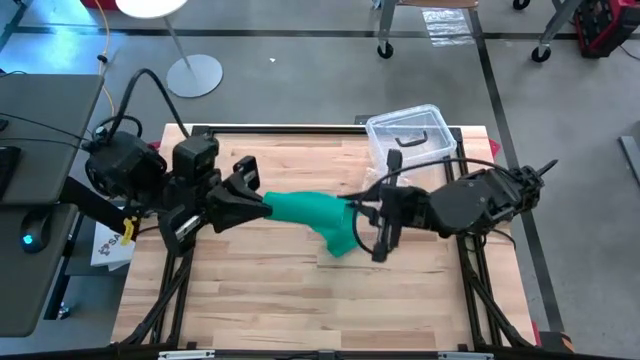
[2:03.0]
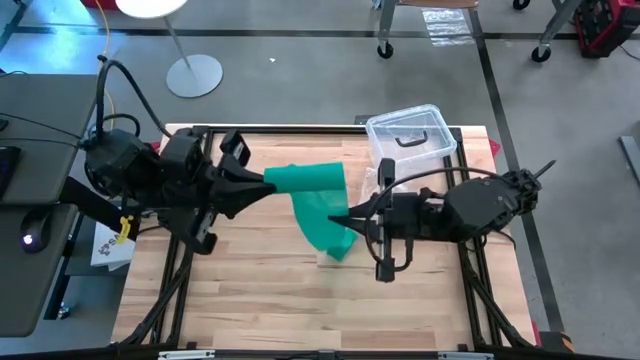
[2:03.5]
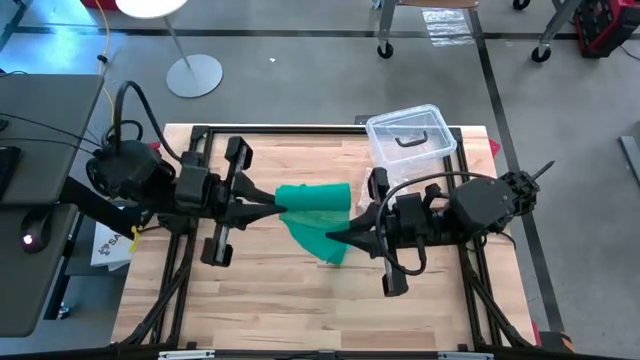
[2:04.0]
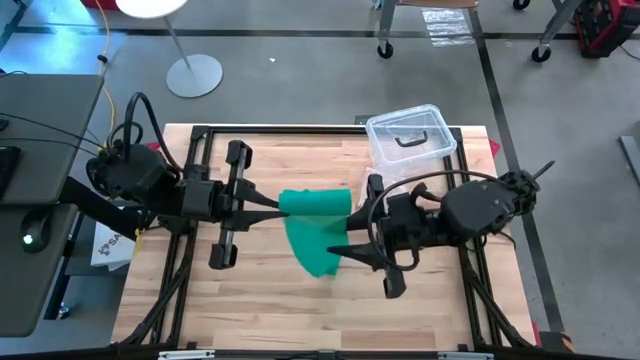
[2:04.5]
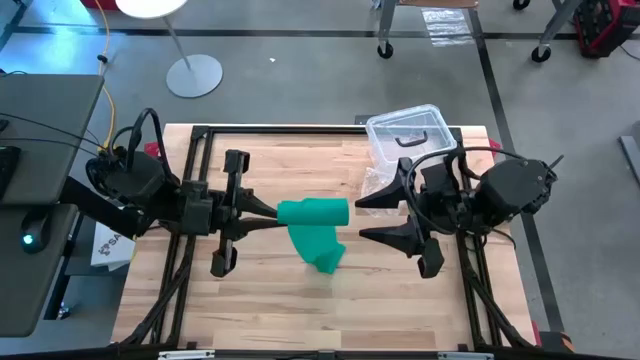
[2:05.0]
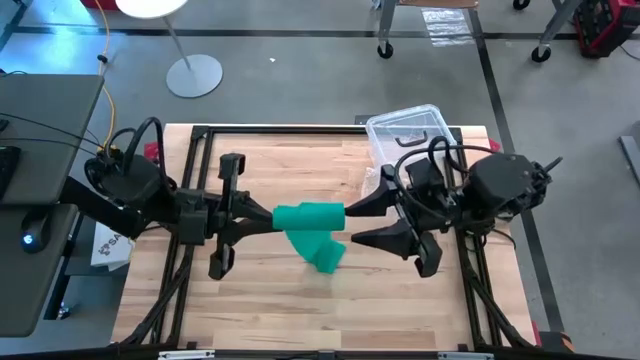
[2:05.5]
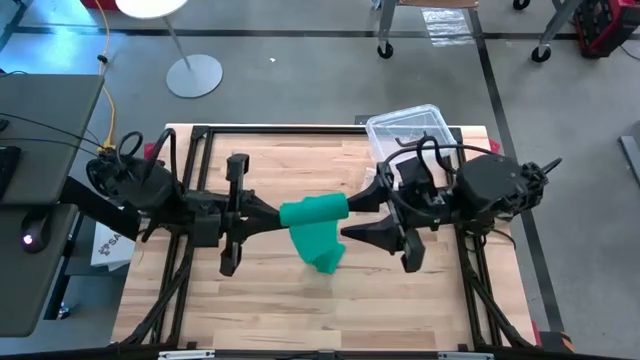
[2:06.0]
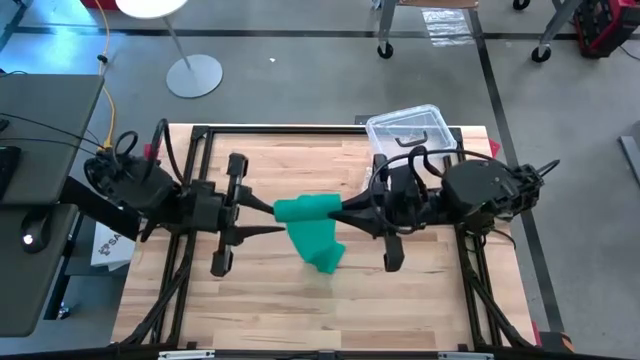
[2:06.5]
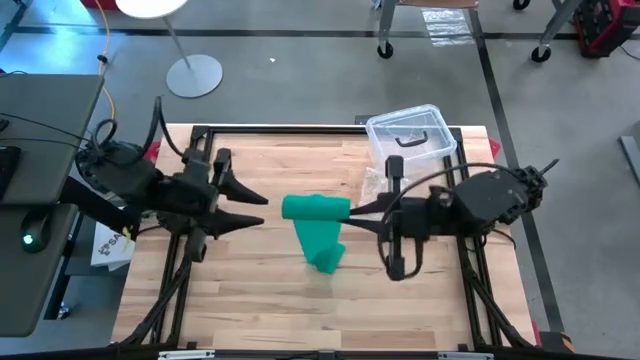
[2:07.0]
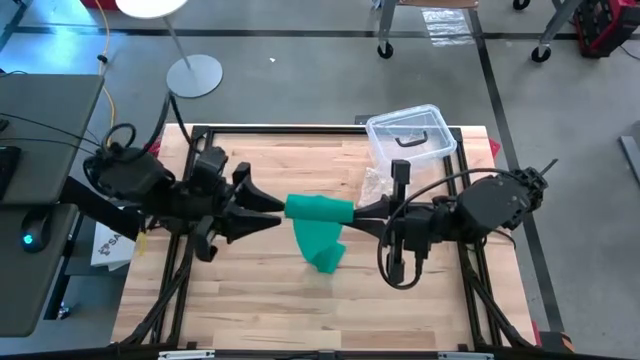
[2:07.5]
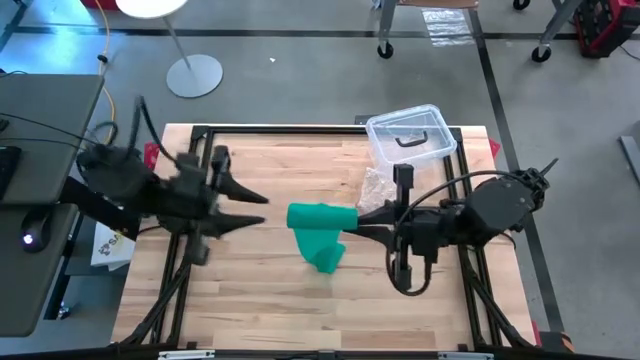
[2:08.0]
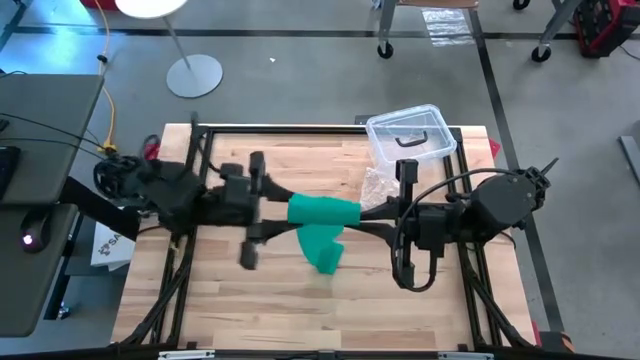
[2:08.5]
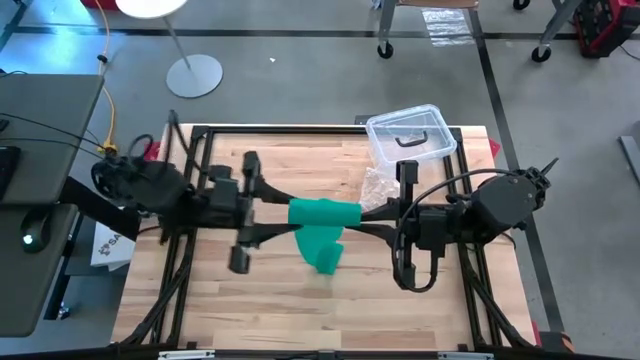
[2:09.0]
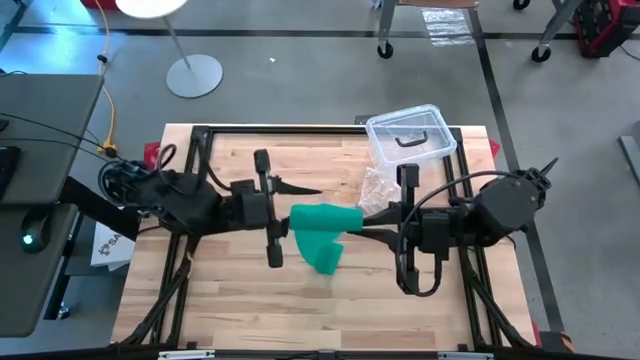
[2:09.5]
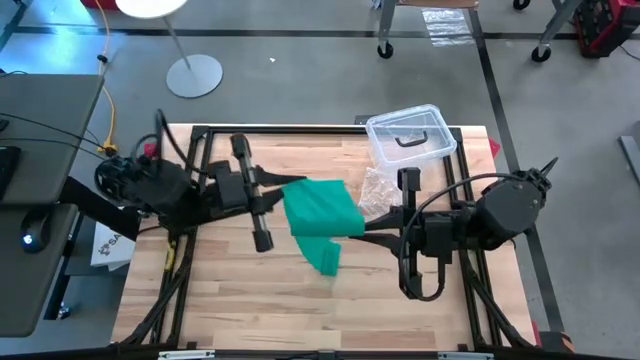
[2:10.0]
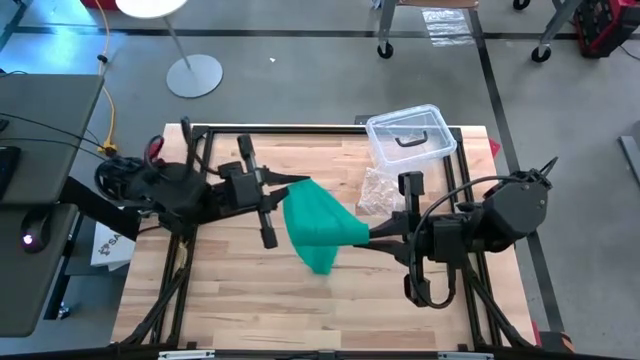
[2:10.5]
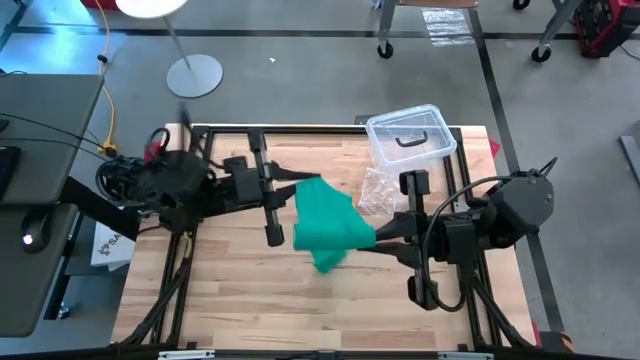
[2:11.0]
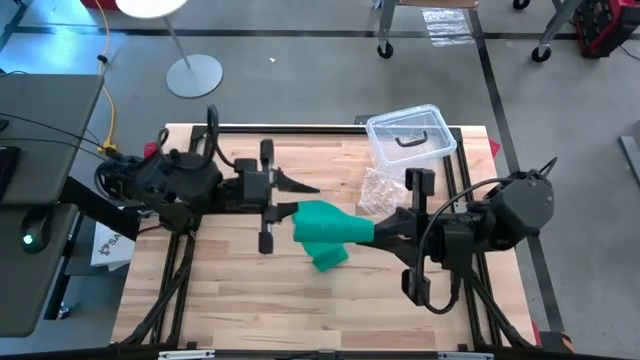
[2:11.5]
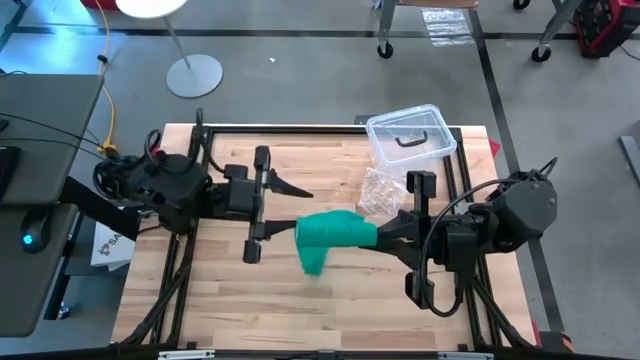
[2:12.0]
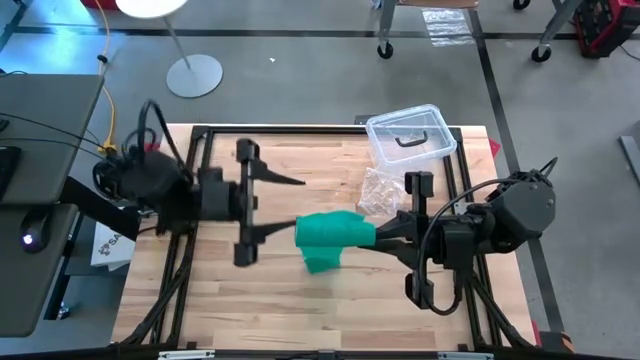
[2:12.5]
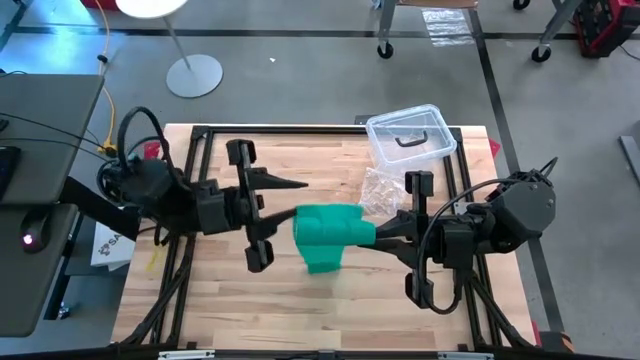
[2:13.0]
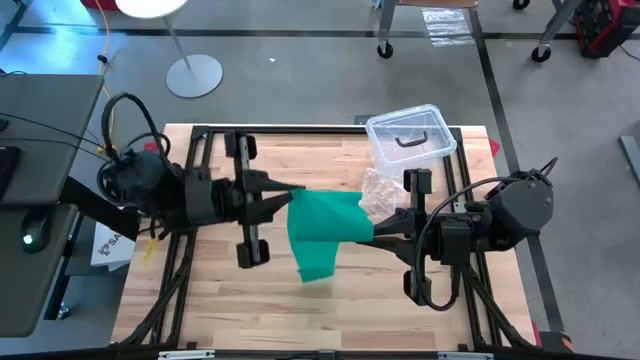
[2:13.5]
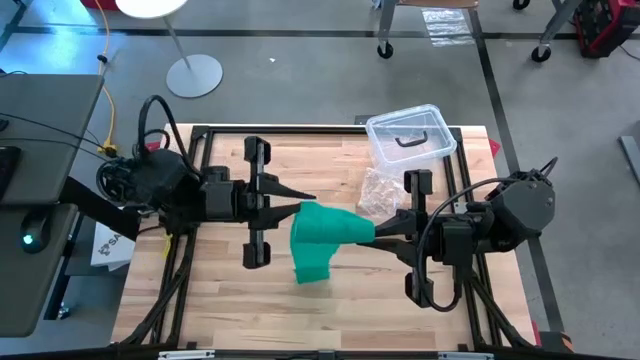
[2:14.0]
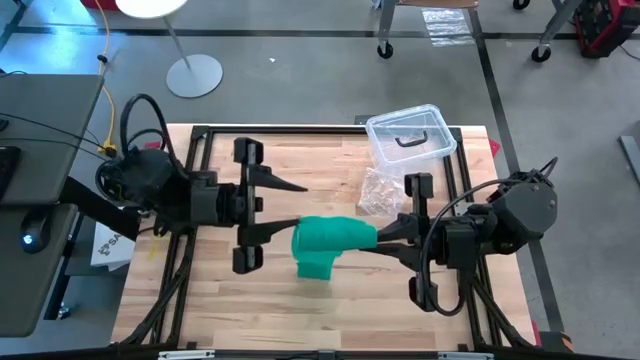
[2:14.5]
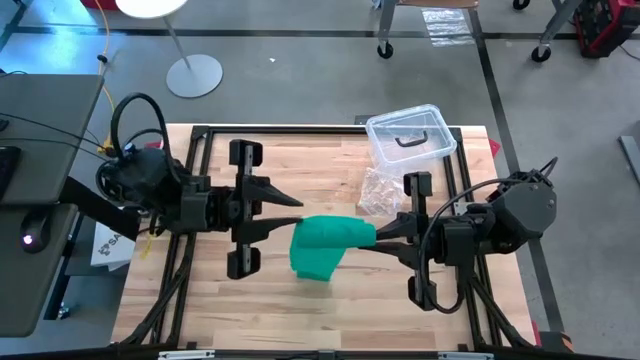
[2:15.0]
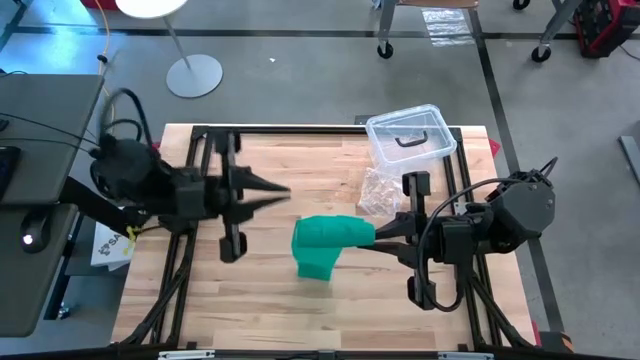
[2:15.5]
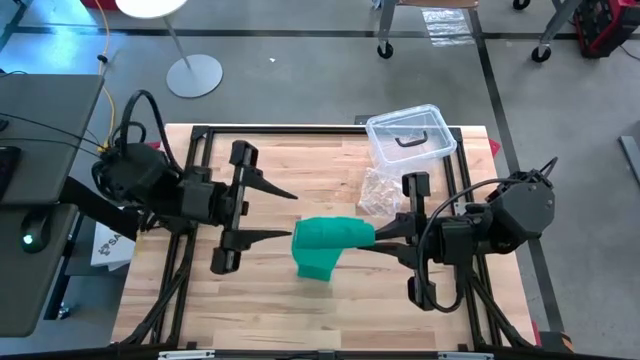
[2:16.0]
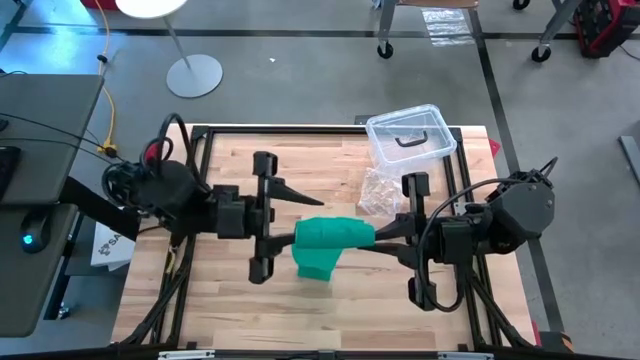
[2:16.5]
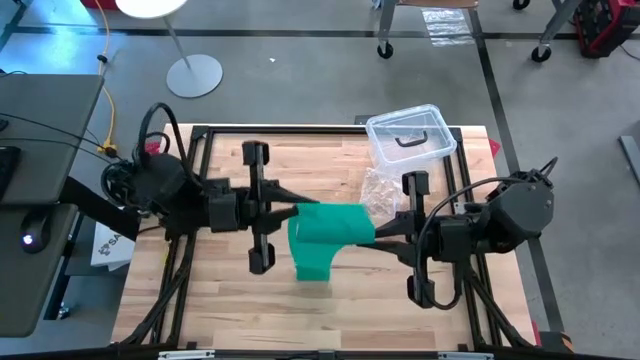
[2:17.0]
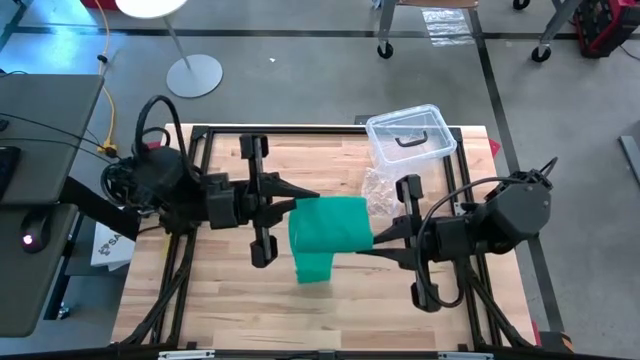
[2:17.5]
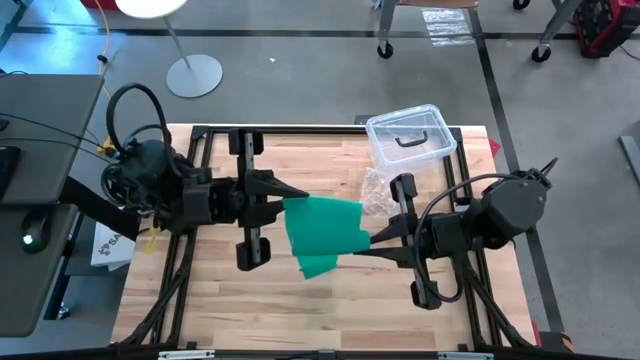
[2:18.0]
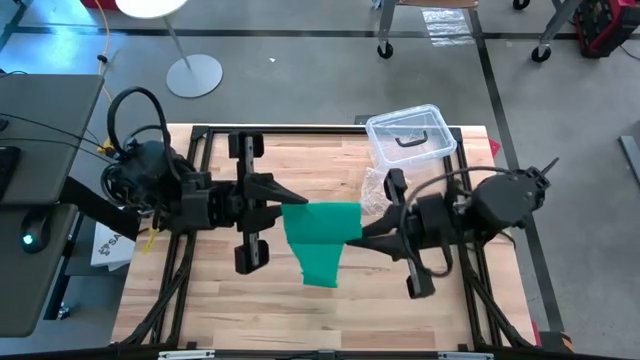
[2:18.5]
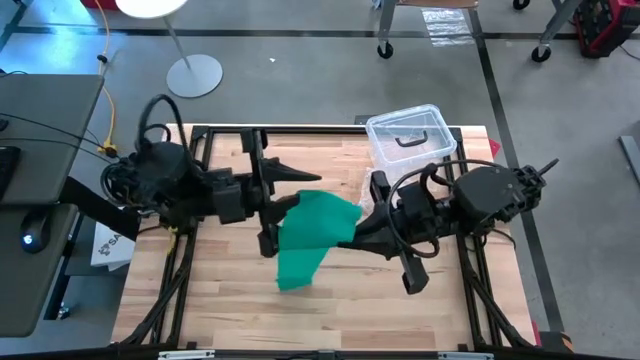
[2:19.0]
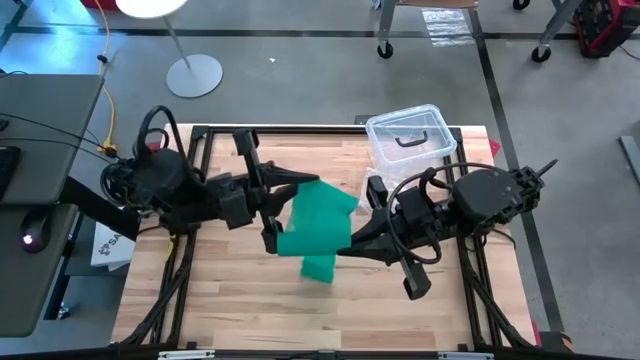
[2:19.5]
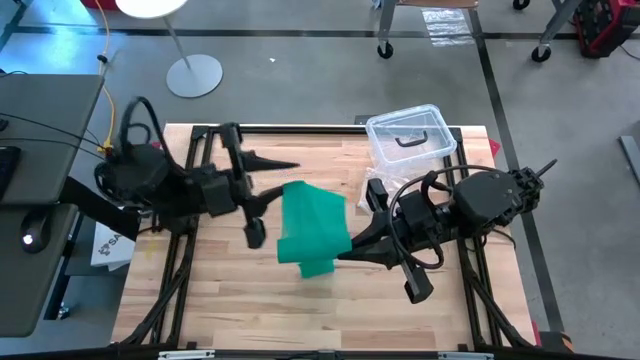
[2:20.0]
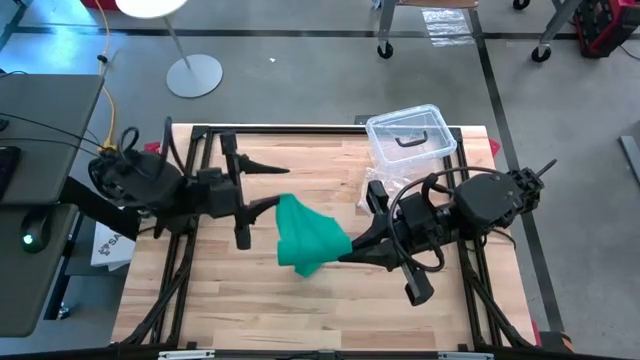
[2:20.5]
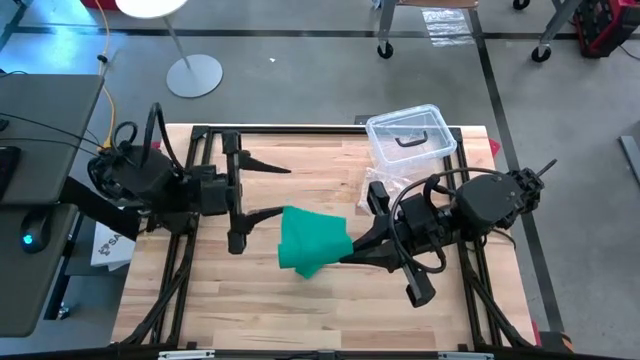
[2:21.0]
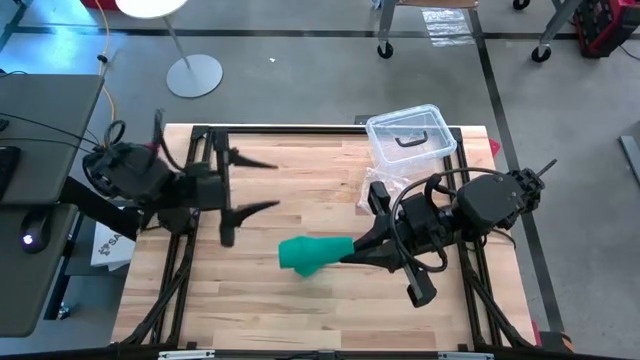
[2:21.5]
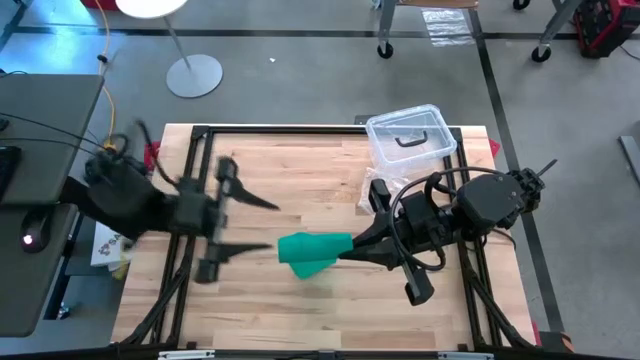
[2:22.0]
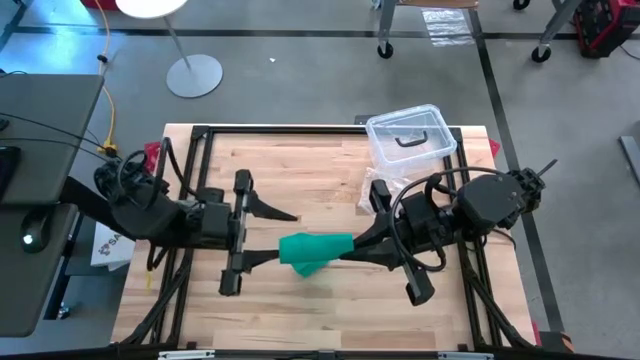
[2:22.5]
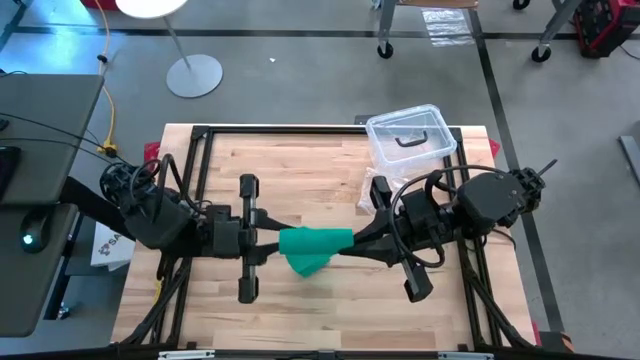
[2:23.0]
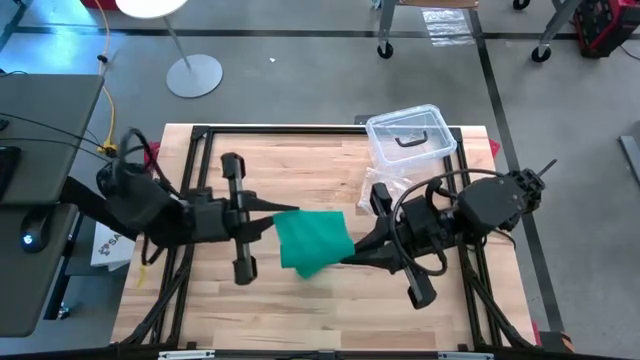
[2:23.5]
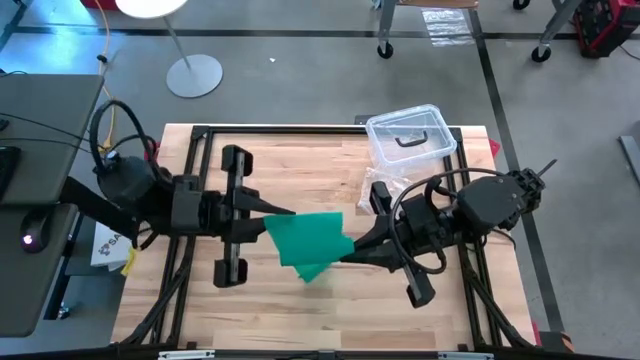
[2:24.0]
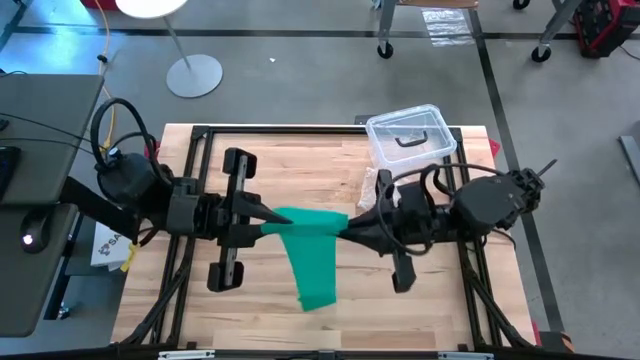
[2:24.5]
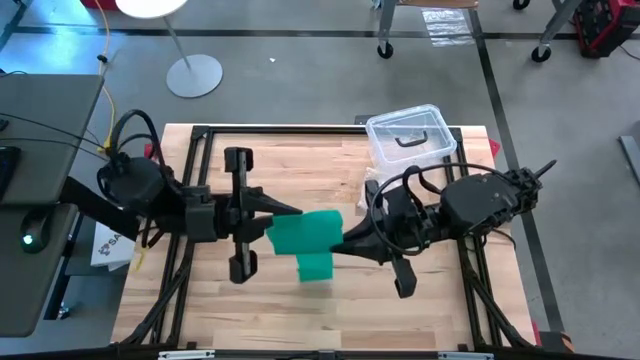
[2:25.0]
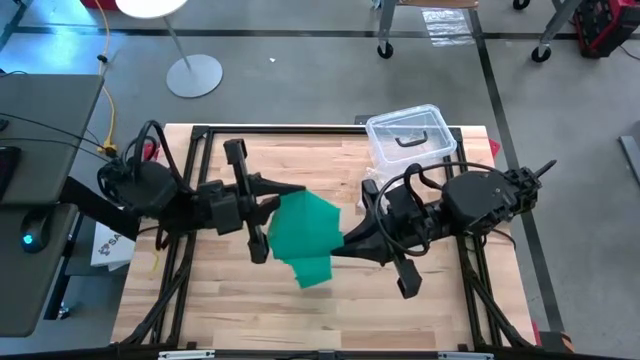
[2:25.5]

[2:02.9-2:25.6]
Task: Roll bandage
Roll the green bandage
